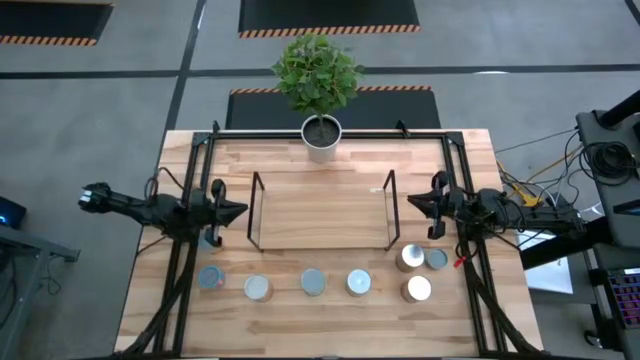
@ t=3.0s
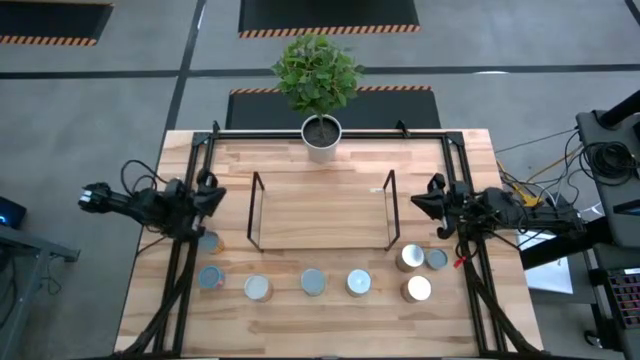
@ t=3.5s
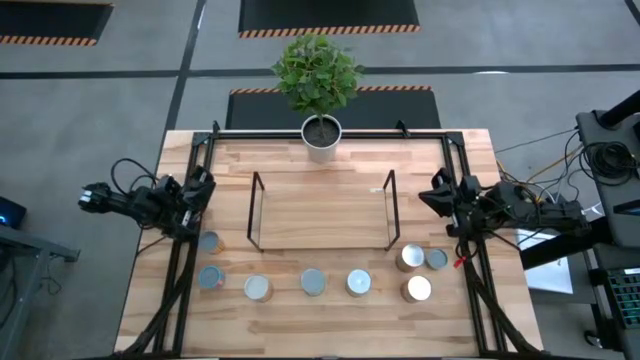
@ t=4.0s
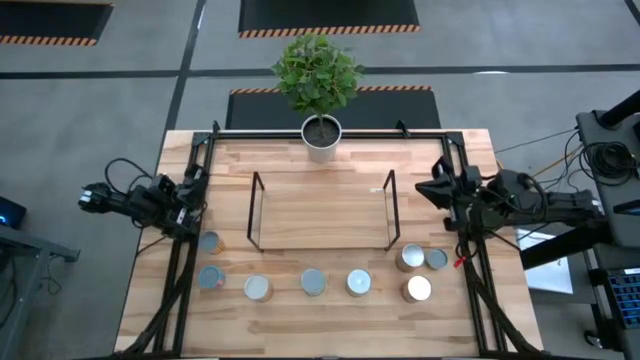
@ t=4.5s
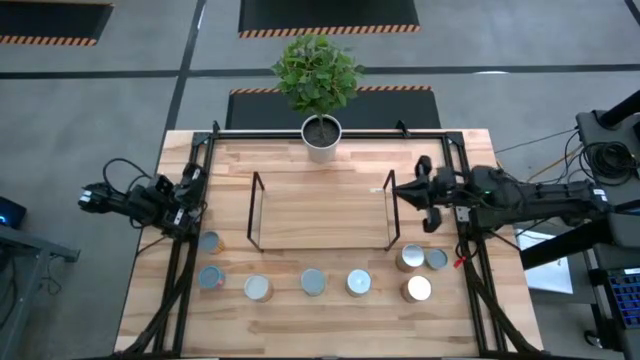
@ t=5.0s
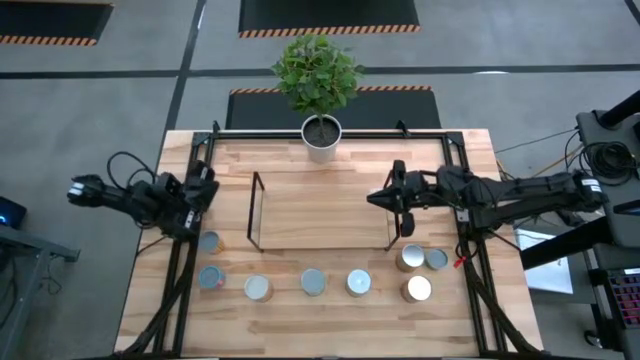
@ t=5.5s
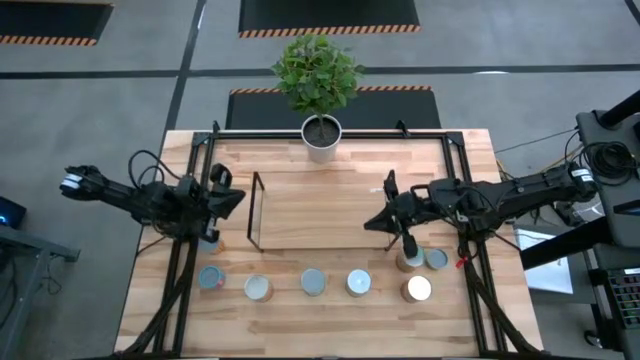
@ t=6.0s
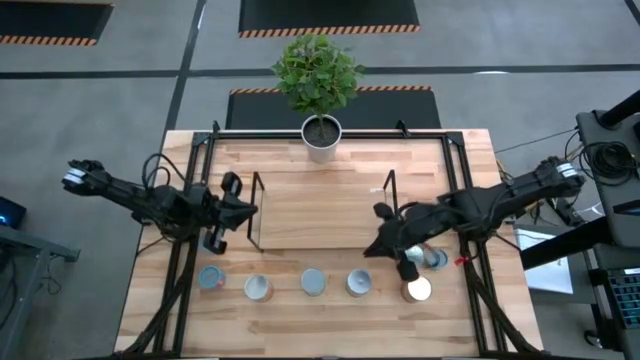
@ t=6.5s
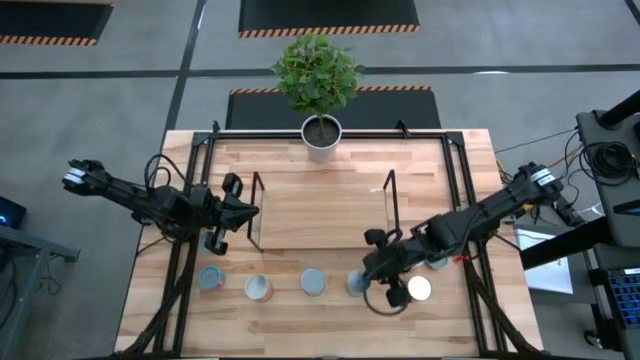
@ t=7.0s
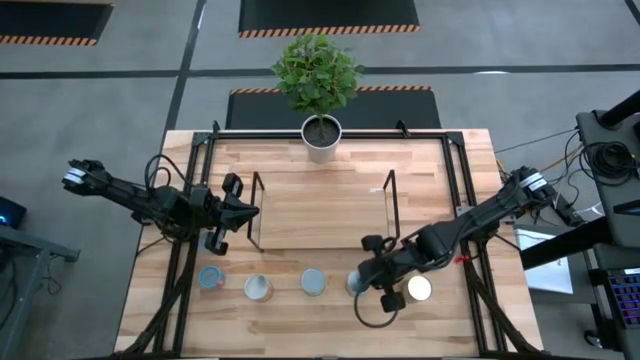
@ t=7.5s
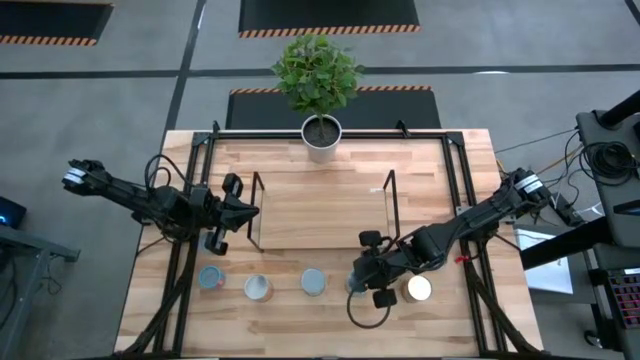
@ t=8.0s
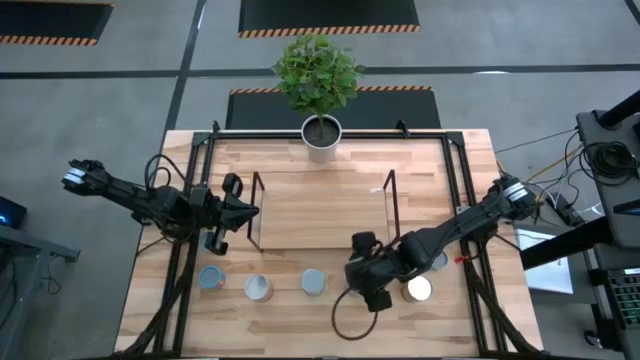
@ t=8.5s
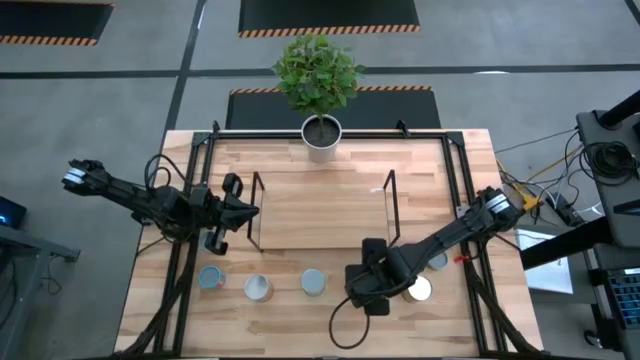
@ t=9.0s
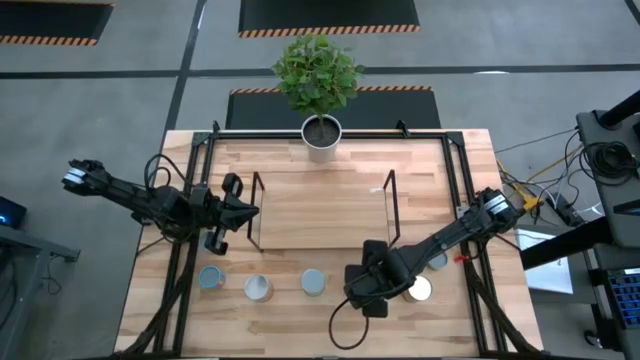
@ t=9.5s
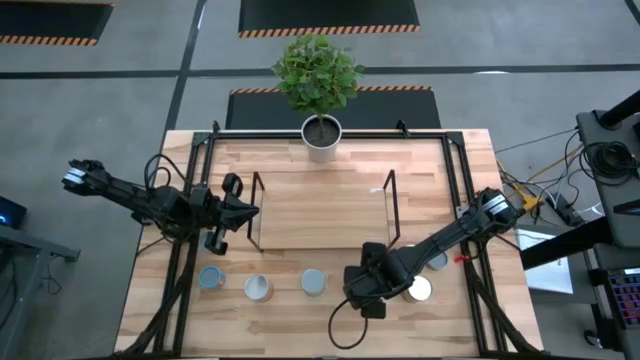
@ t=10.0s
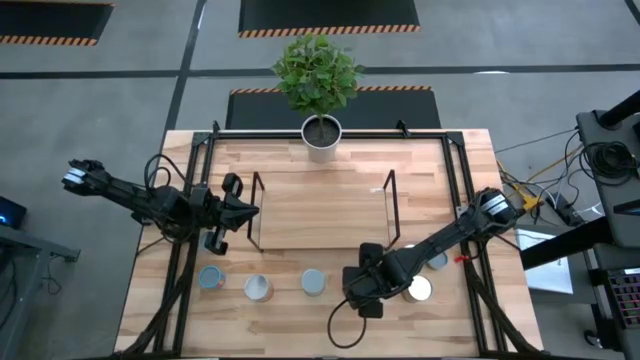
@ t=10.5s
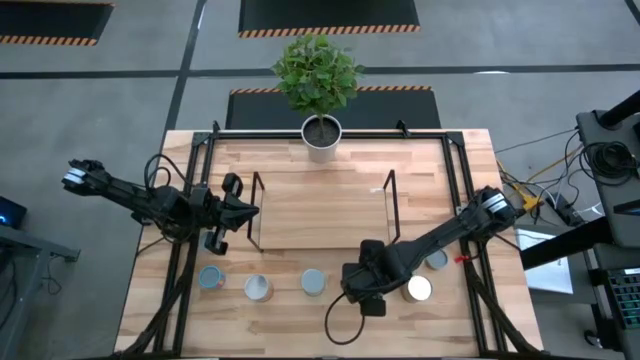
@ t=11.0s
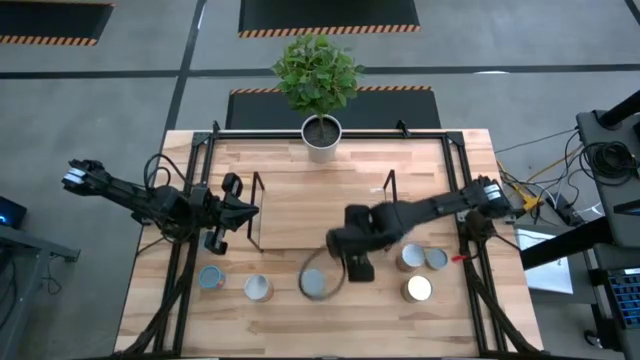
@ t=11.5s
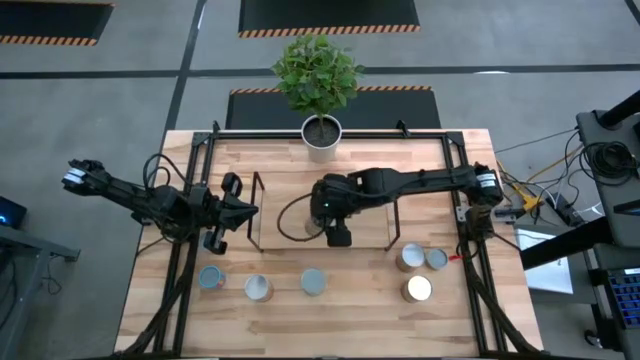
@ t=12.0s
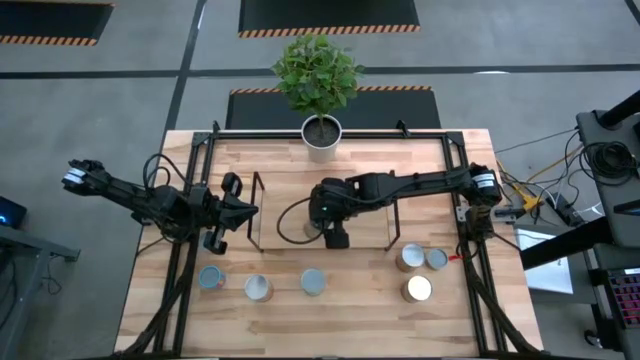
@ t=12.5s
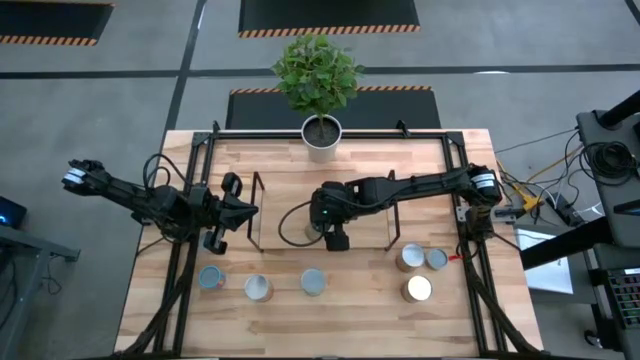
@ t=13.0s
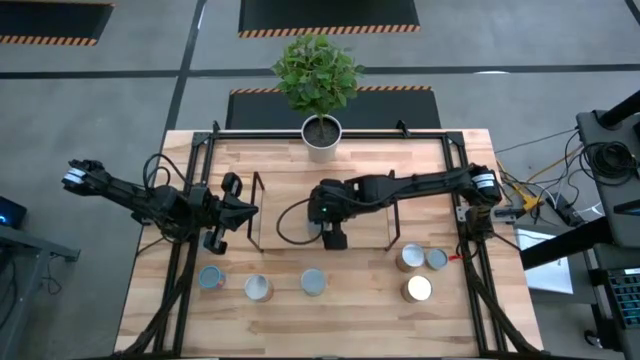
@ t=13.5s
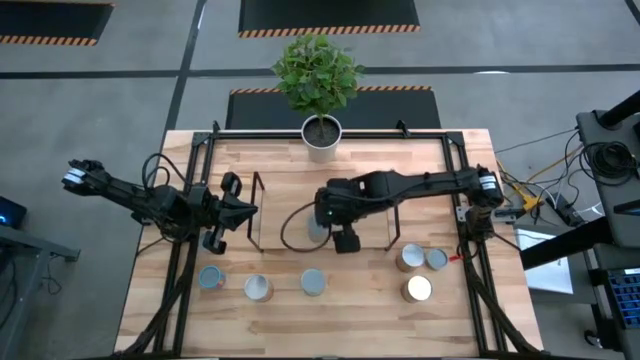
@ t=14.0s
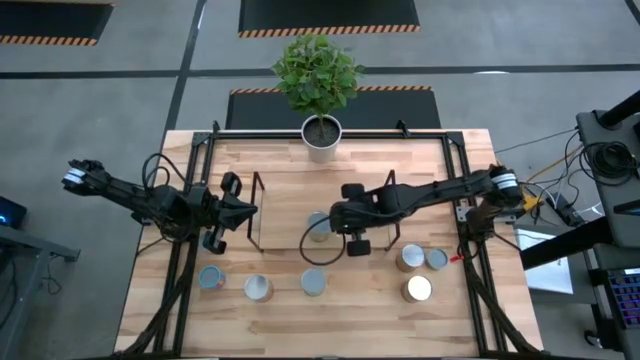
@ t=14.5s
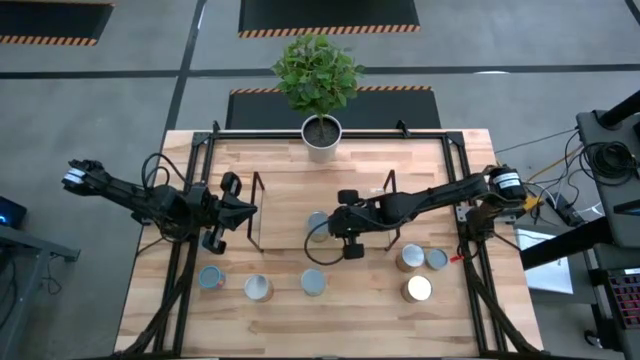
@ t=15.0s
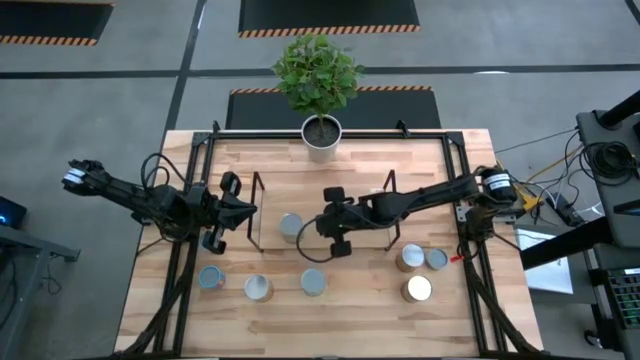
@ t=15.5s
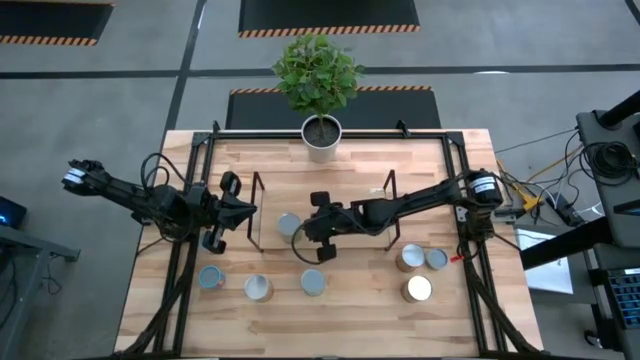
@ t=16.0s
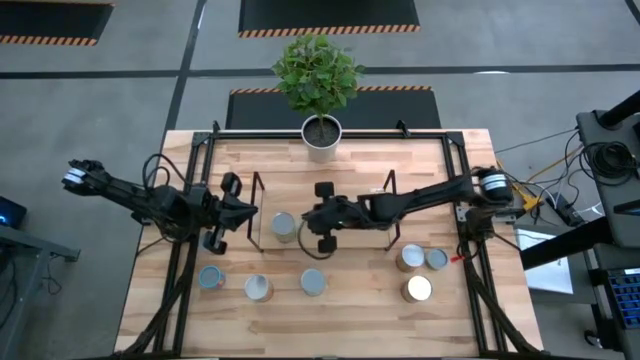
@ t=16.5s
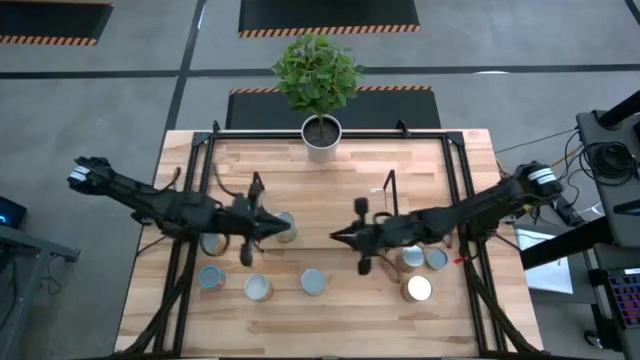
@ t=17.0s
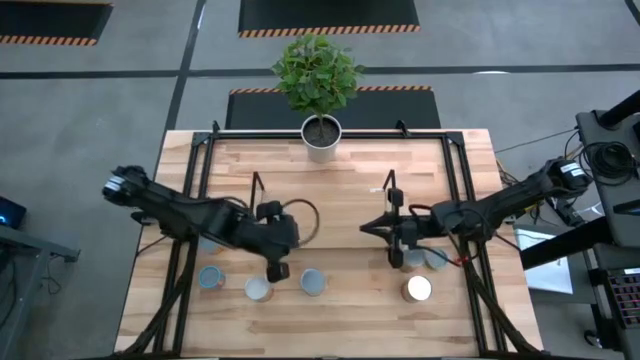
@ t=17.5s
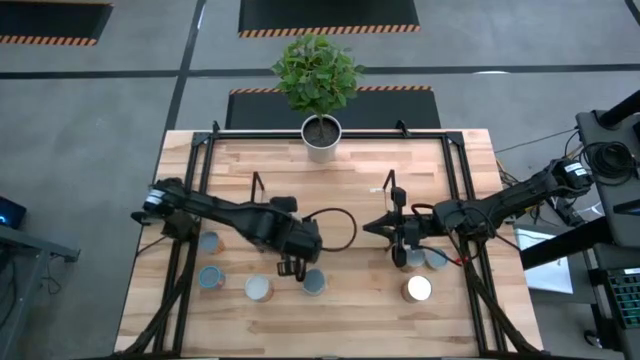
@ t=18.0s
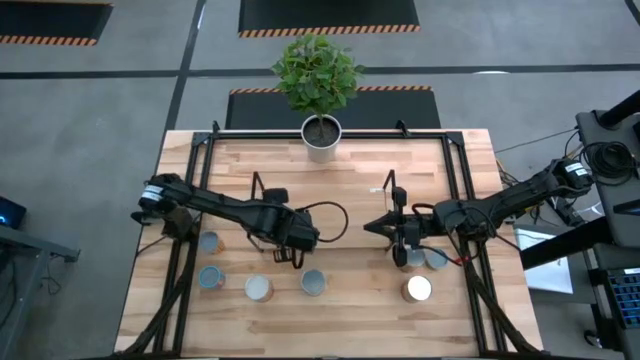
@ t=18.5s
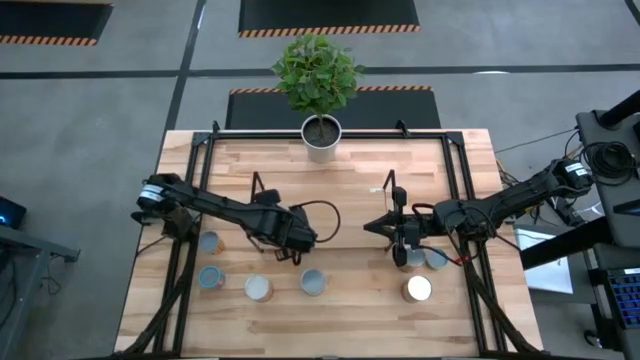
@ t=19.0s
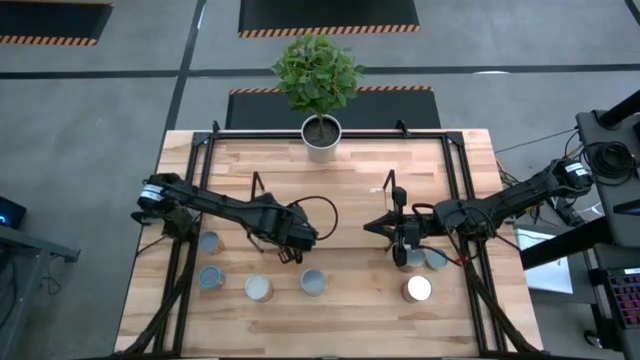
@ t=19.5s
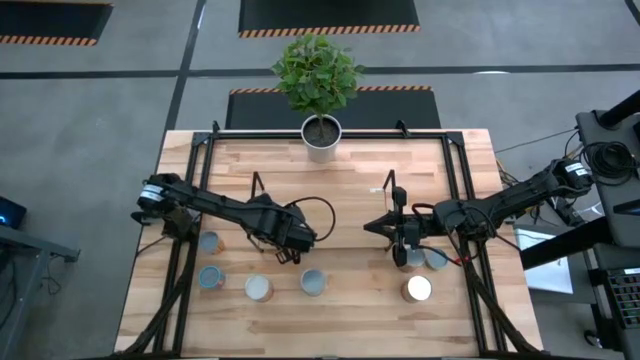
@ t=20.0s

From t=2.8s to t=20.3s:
Task: Pick and place cans onto a shelf
Put the canned oranges on the shelf
